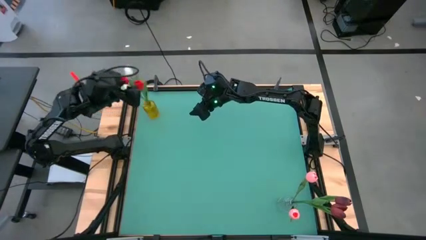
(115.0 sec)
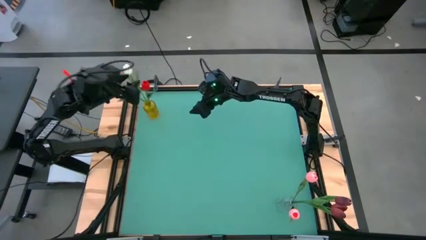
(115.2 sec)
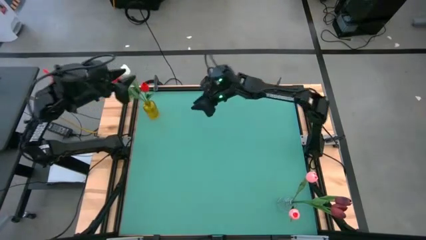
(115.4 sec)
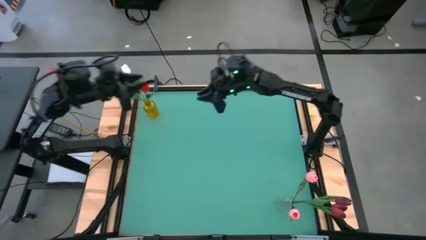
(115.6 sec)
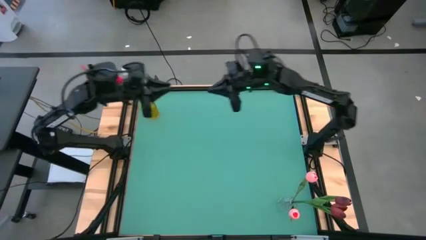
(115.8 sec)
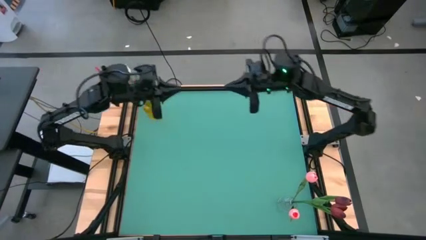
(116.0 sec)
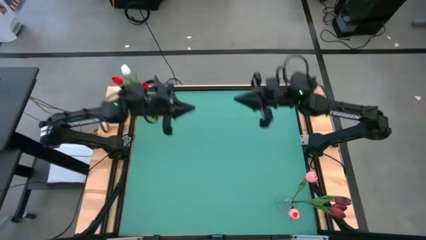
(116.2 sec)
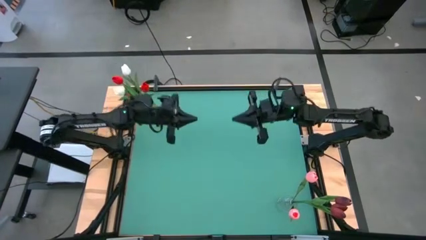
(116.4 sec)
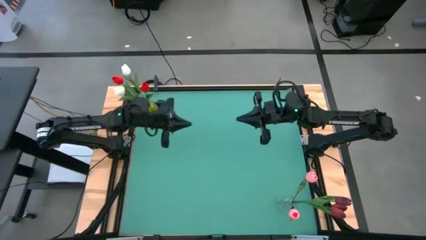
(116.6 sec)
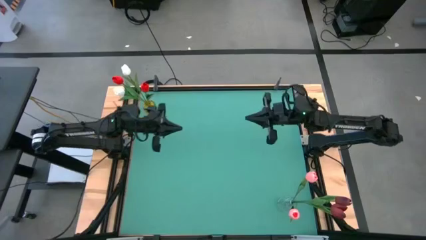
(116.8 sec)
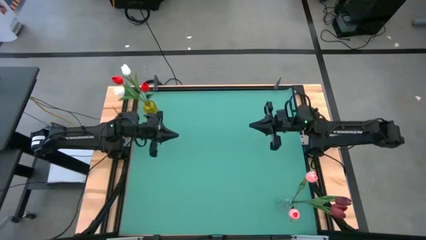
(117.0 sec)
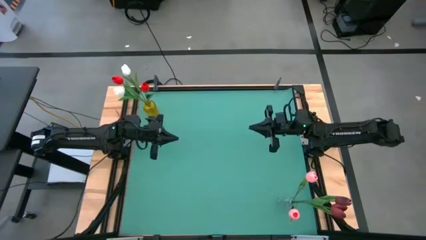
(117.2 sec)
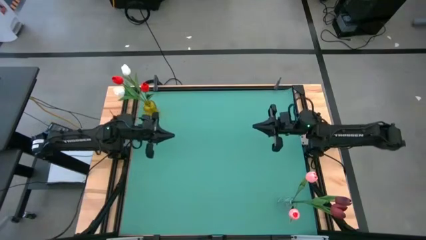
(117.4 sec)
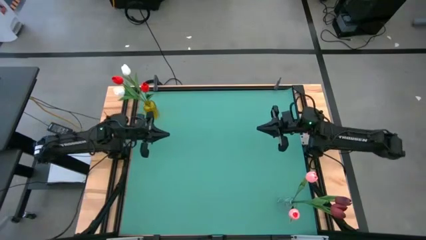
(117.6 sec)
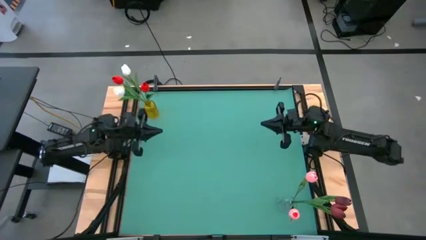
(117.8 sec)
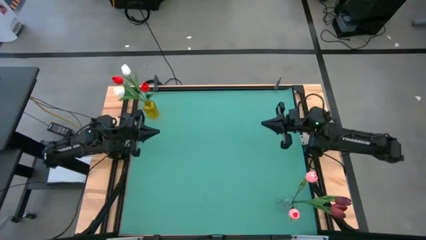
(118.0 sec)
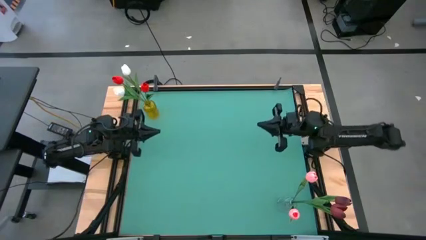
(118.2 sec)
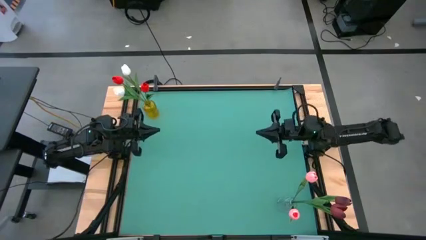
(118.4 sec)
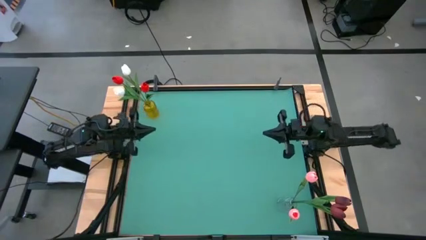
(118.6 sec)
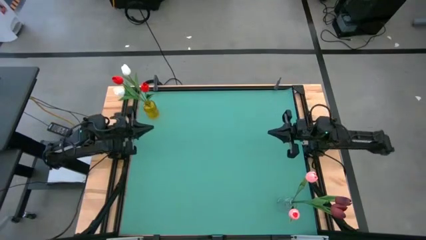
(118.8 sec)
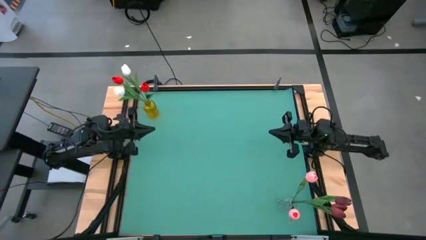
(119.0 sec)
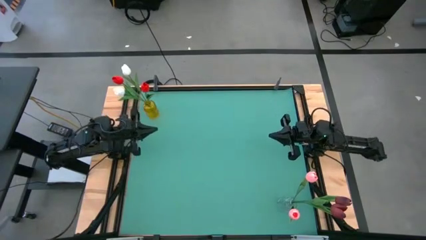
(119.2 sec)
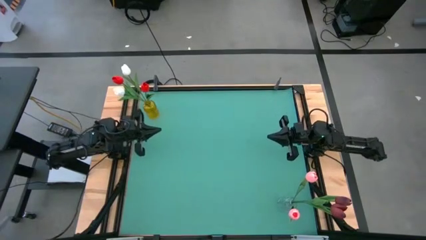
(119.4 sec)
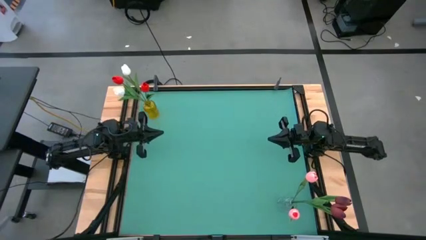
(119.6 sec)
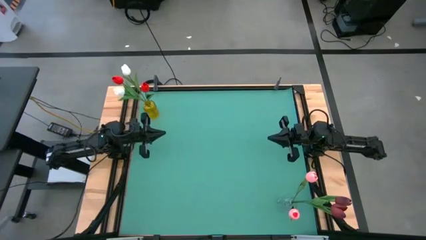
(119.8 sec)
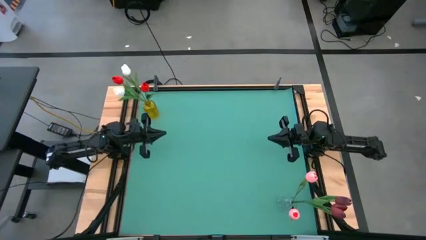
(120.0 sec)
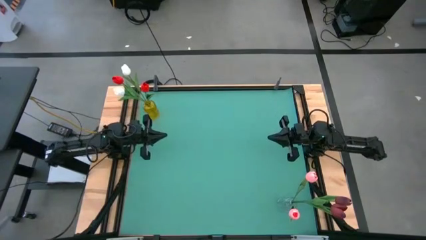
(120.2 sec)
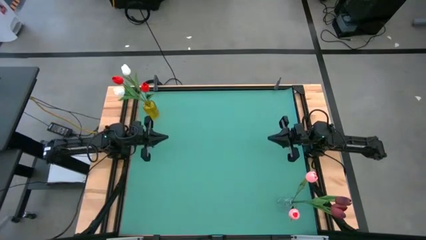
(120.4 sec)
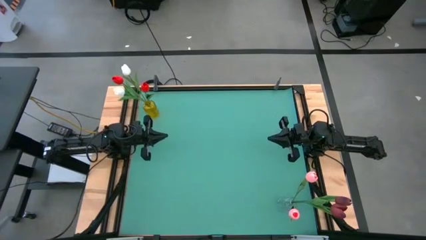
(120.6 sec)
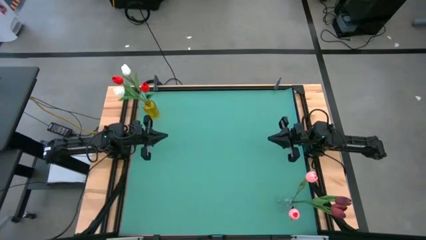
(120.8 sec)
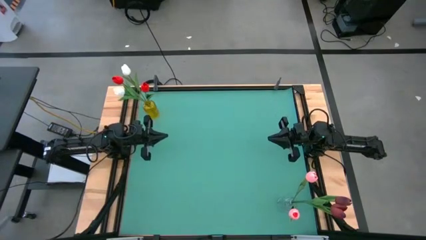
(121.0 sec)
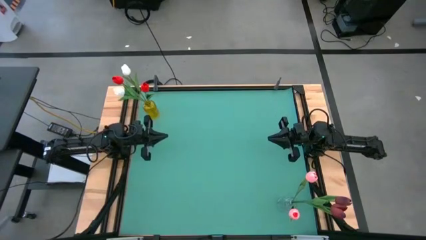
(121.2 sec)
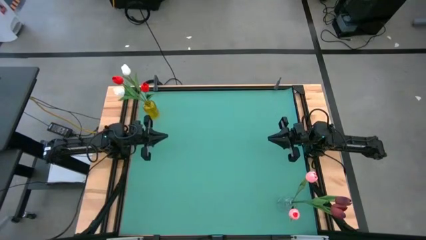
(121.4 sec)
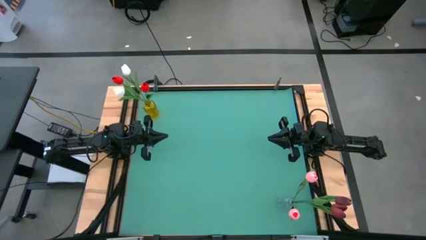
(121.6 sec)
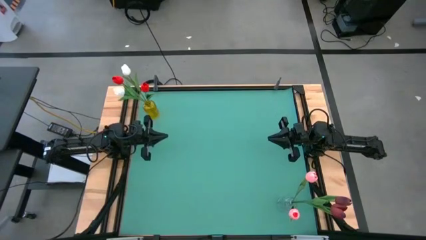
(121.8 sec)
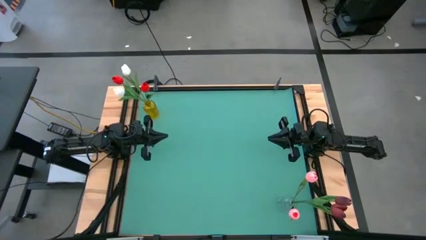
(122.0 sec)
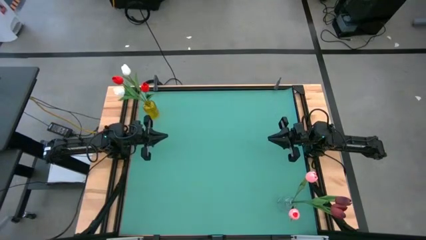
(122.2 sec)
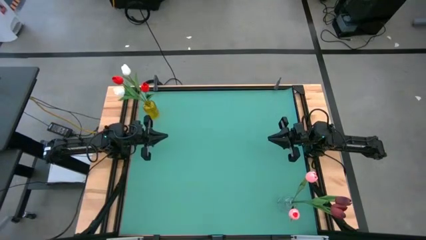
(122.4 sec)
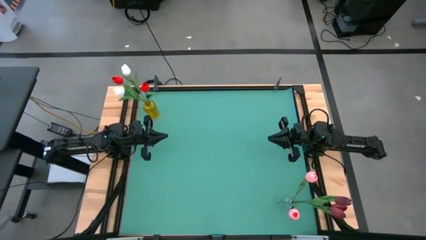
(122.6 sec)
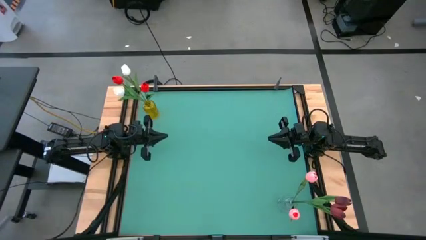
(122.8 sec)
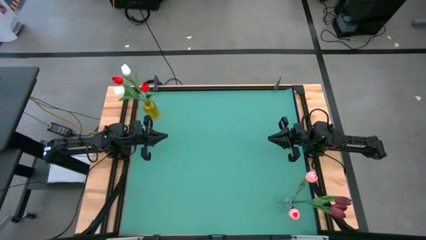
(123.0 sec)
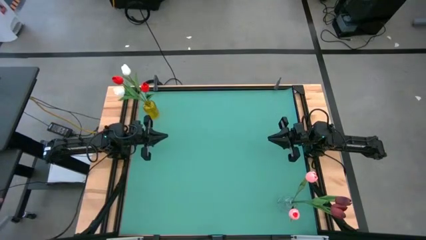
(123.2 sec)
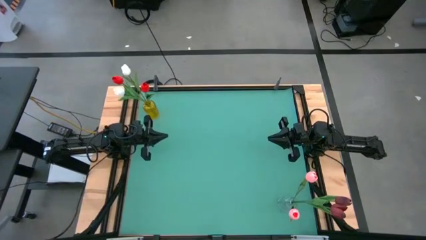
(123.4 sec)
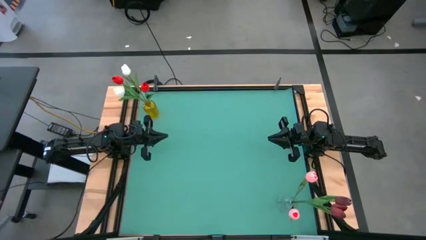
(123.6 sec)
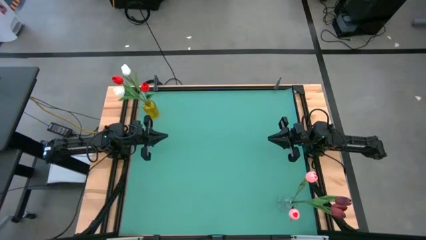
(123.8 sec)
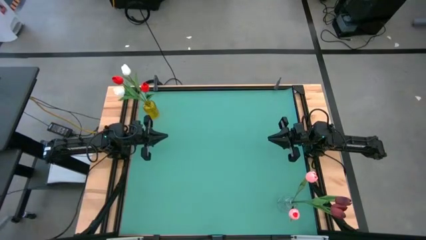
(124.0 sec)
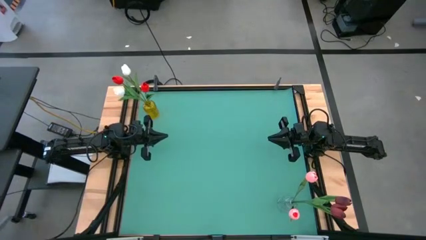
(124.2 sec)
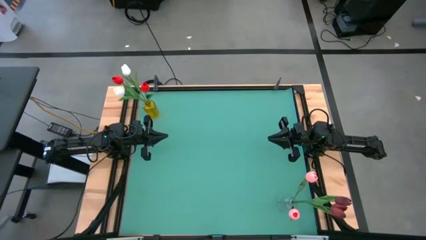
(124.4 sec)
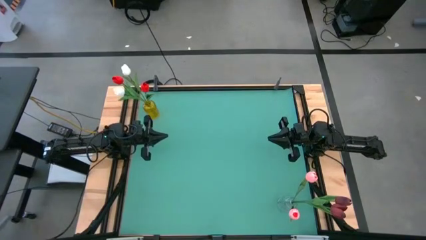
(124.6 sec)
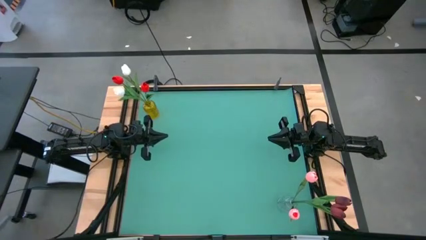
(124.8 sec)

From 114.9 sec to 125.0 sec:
Task: Sort flowers into vase by color
Return to Home Position
